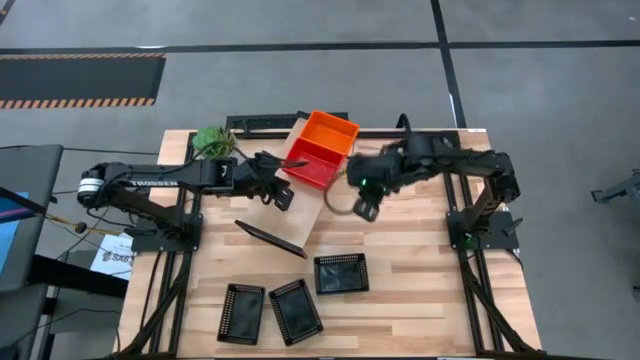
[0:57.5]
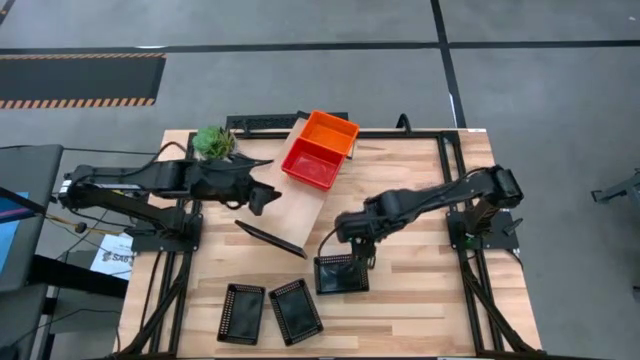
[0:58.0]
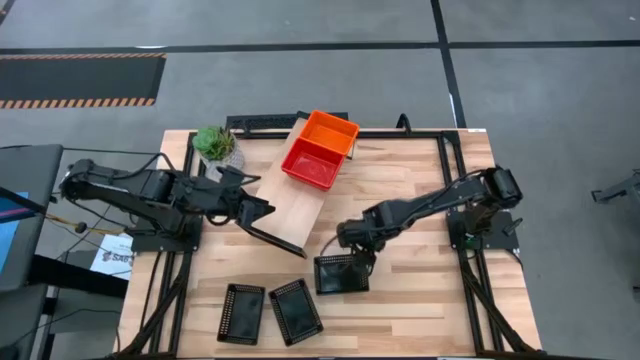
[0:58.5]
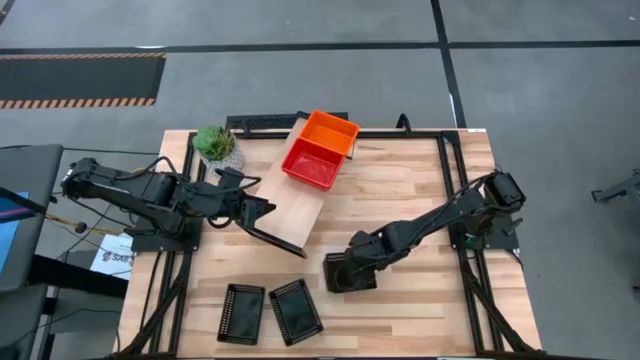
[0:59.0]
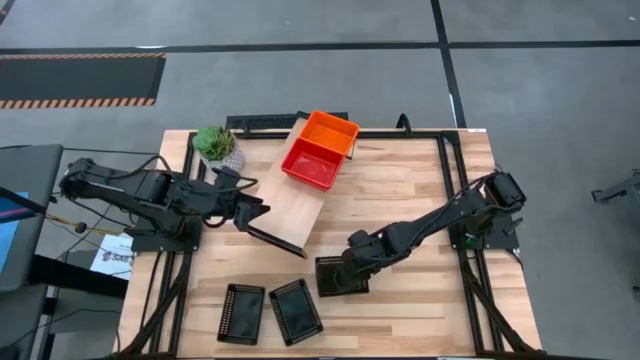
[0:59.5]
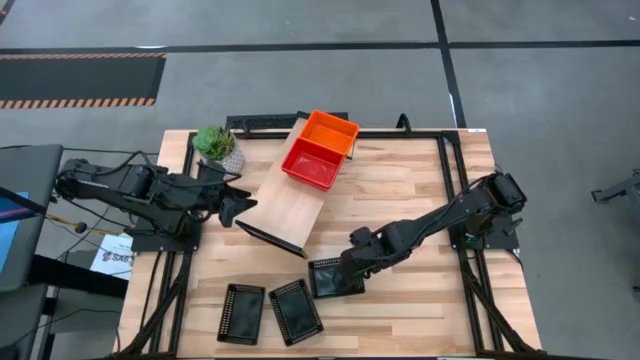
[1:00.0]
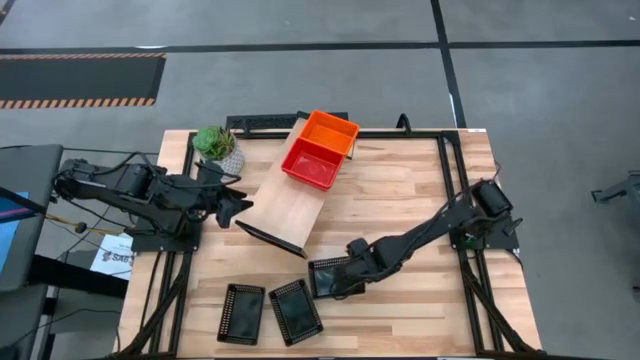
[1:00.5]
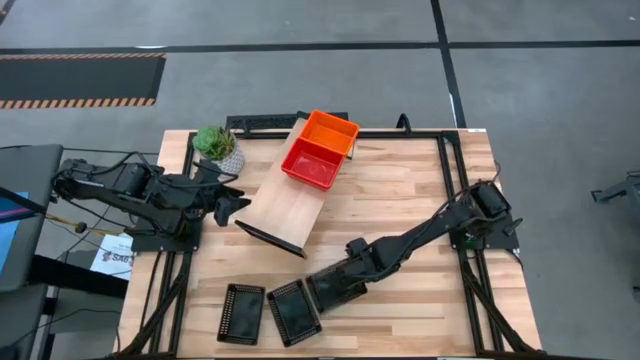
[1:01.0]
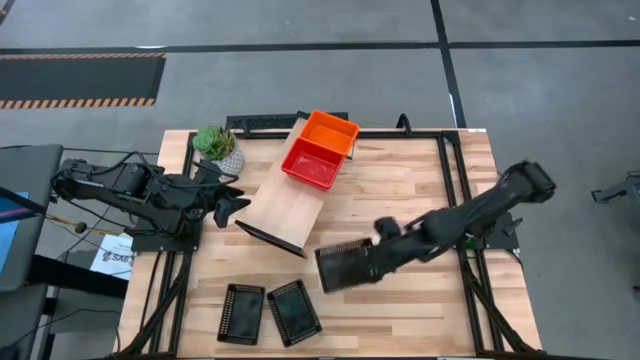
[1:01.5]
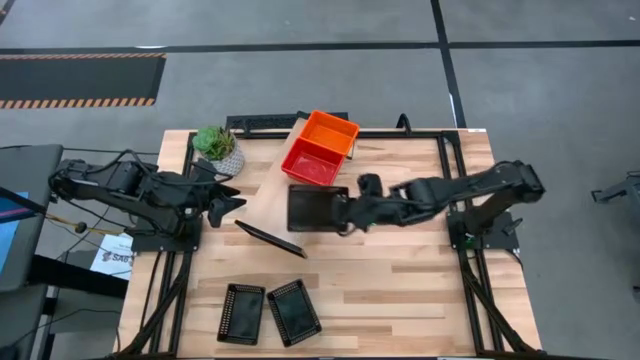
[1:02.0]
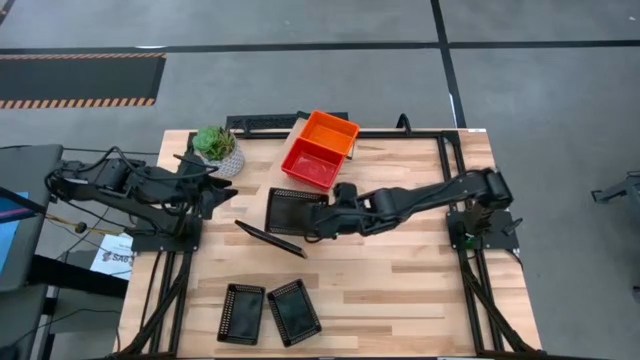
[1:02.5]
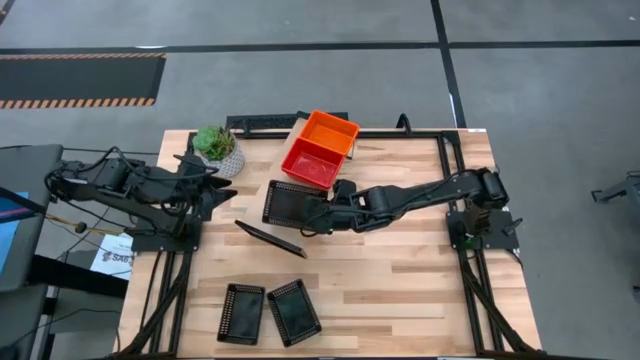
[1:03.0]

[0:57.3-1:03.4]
Task: Stack baskets on shelf by color
Put the right black bin on the shelf

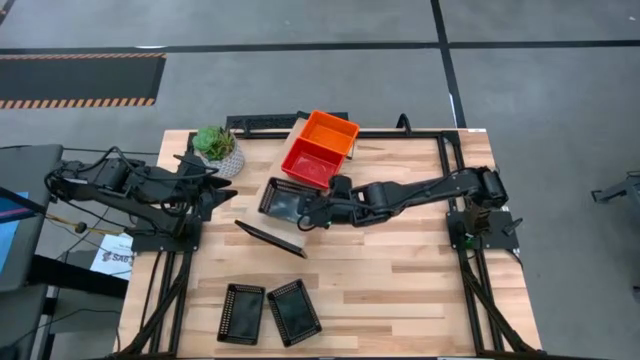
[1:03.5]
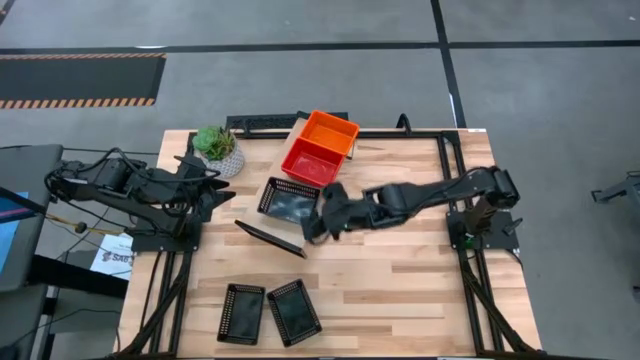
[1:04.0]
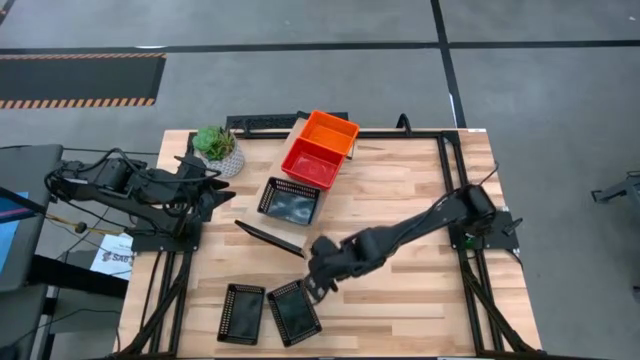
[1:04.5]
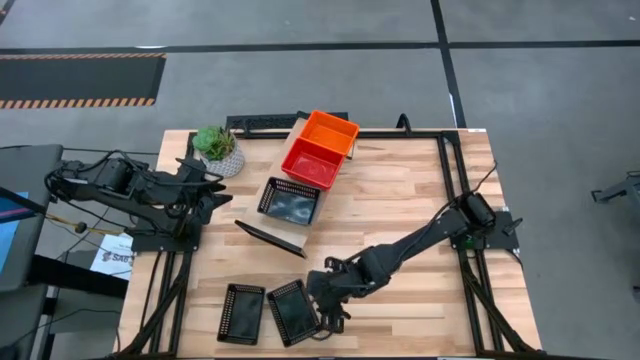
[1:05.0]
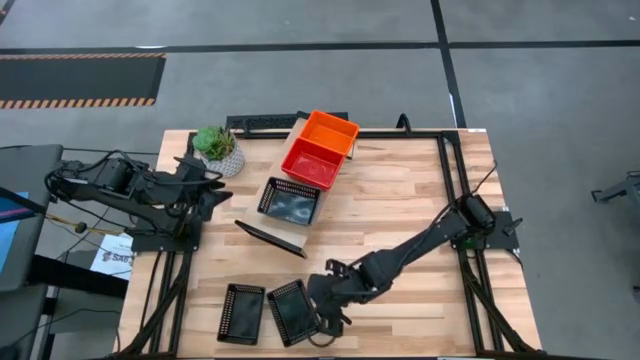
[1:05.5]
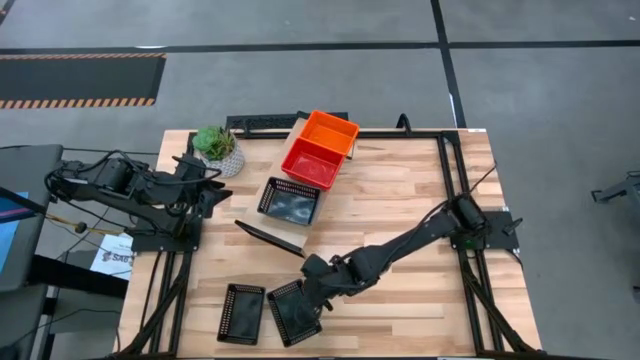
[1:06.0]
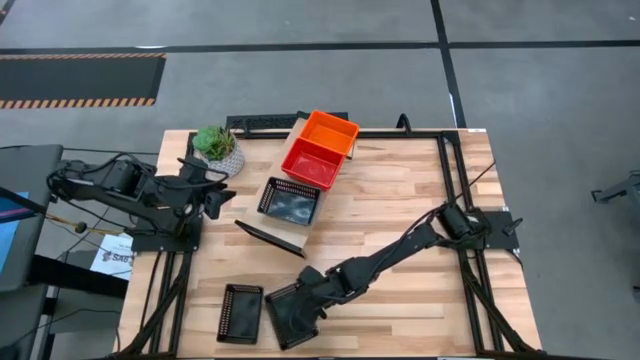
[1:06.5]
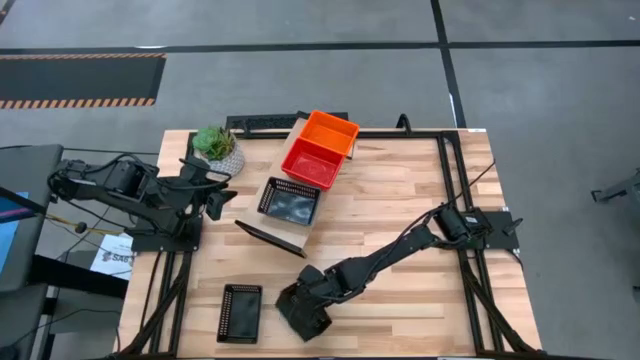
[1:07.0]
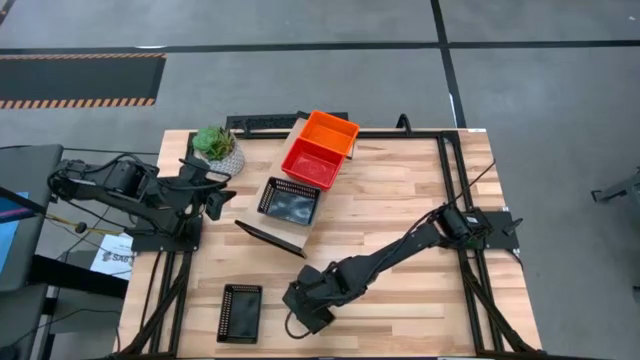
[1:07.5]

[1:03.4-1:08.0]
Stack the right black bin on top of the black bin on the shelf

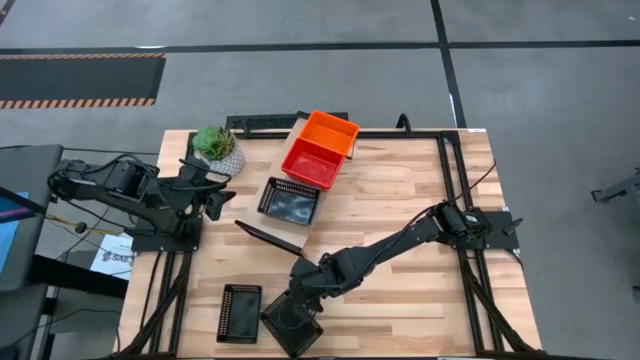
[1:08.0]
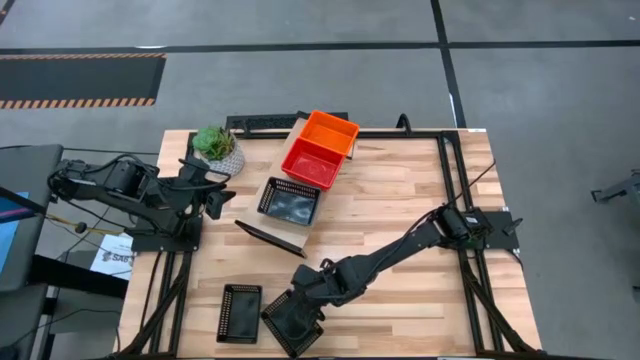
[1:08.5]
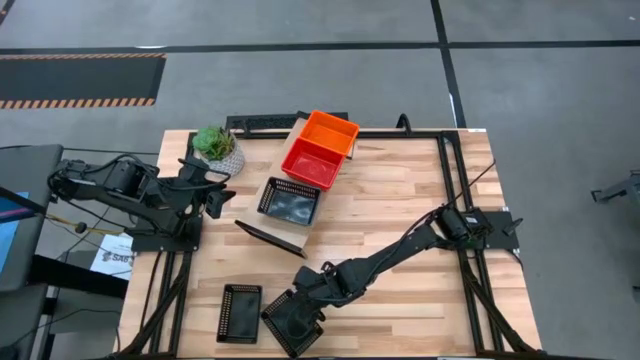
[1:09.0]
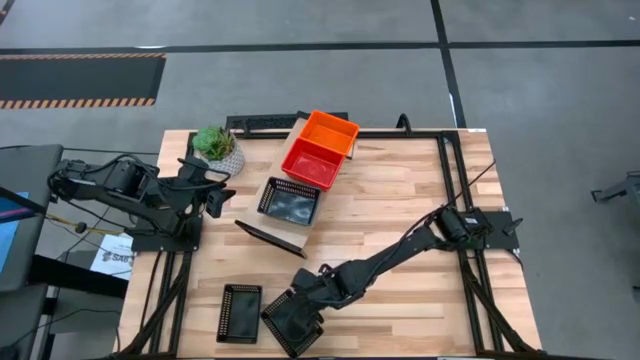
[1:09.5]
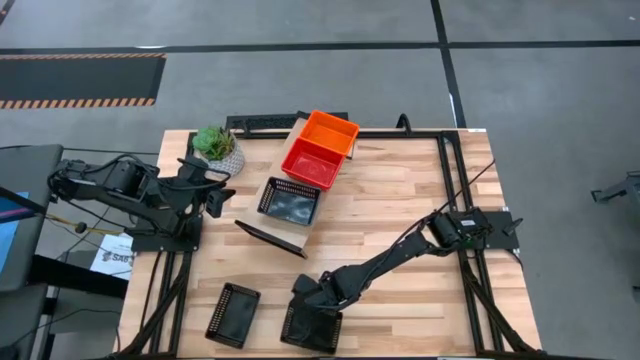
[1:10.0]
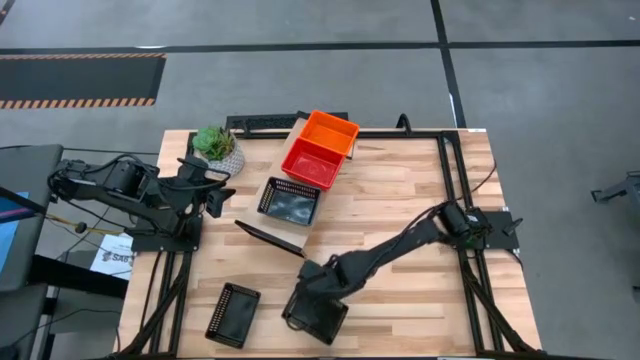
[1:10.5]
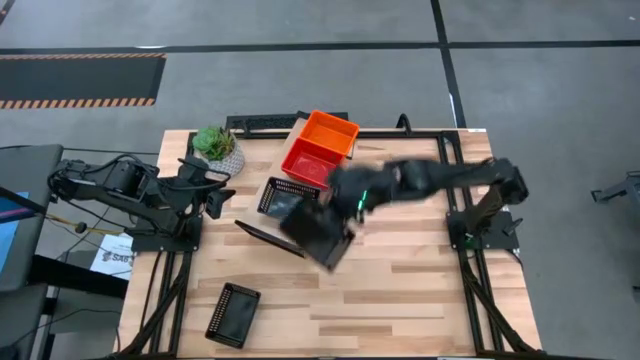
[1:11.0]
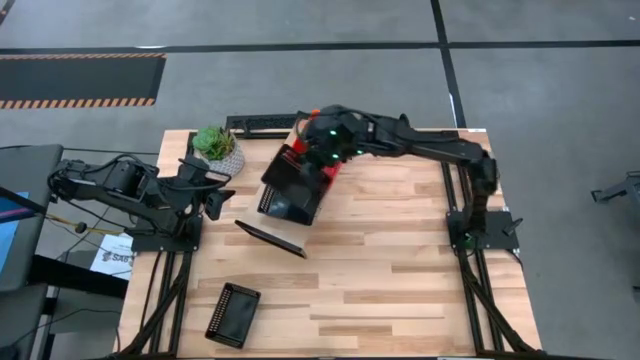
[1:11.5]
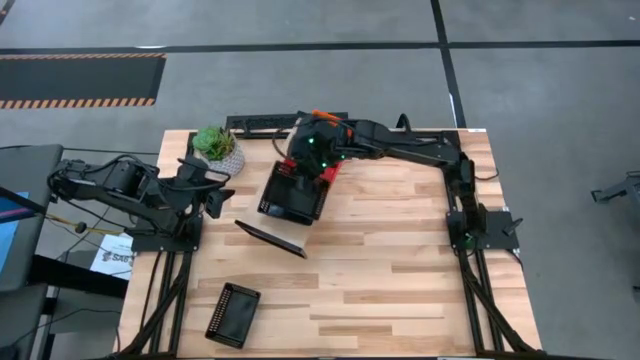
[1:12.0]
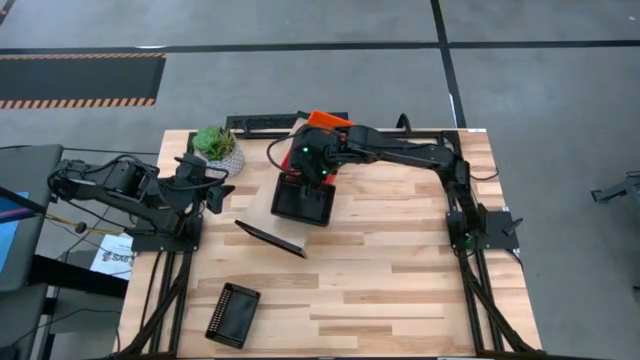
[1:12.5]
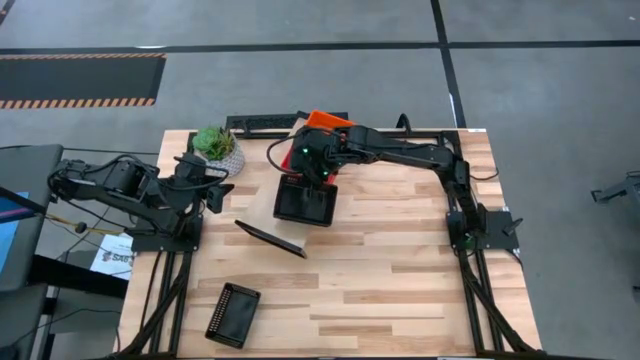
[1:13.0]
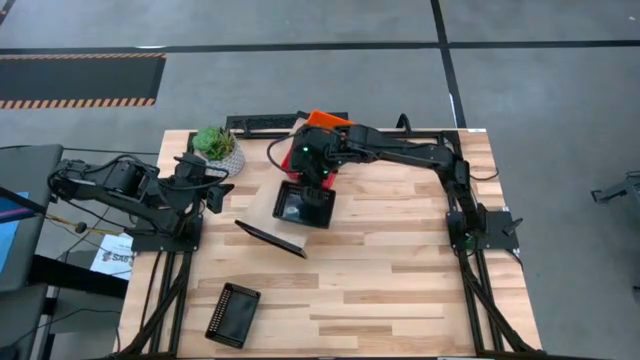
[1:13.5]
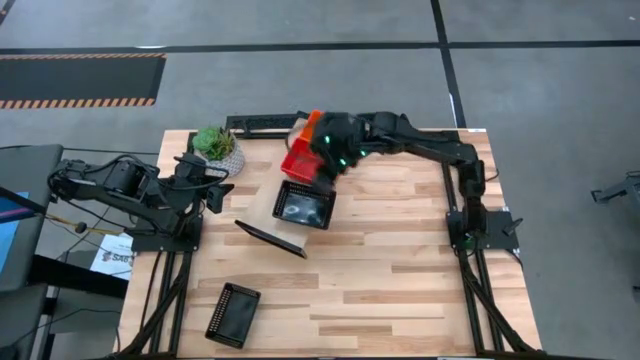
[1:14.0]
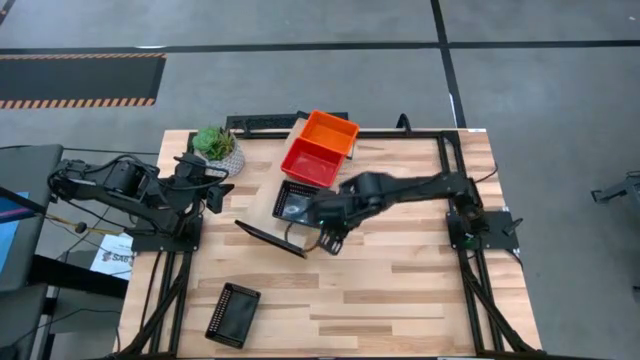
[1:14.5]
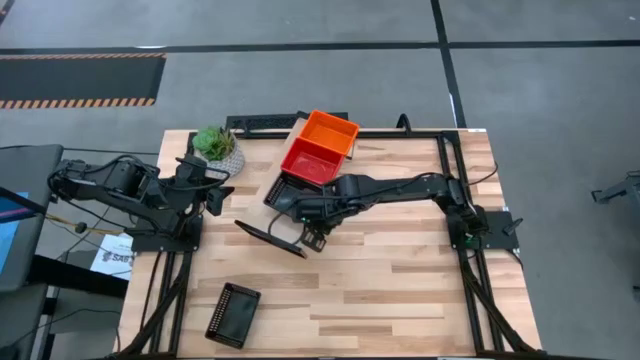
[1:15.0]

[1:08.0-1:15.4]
Stack the right black bin on top of the black bin on the shelf

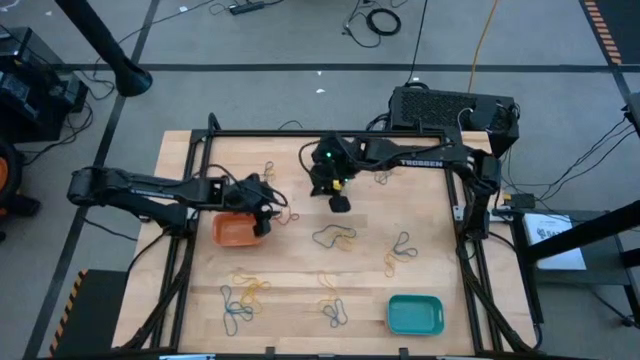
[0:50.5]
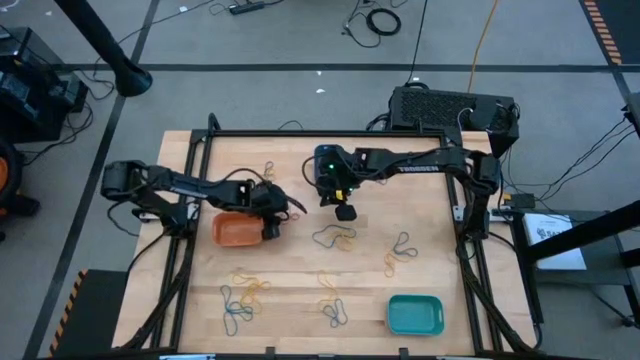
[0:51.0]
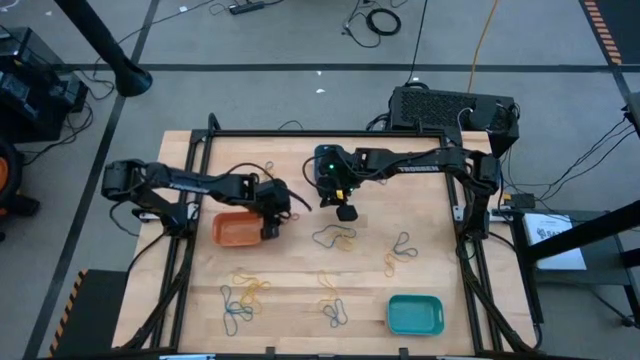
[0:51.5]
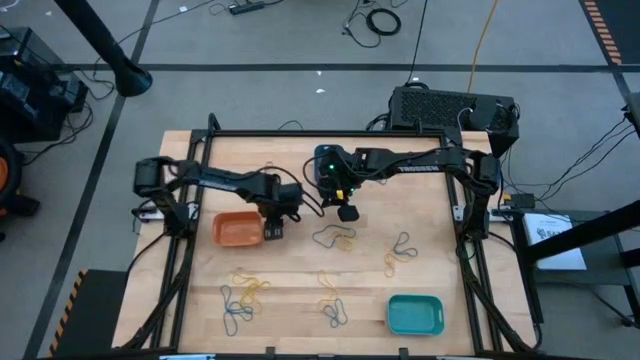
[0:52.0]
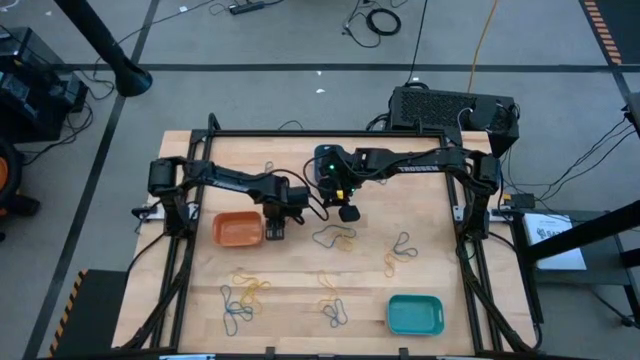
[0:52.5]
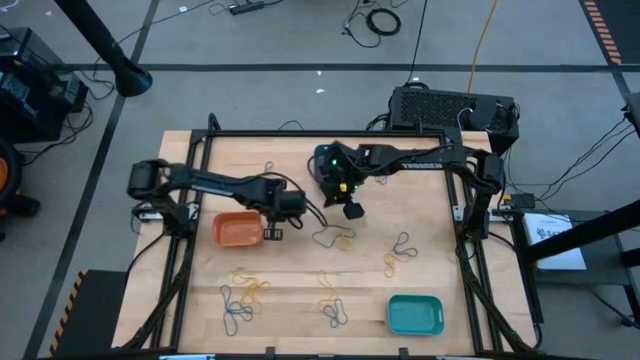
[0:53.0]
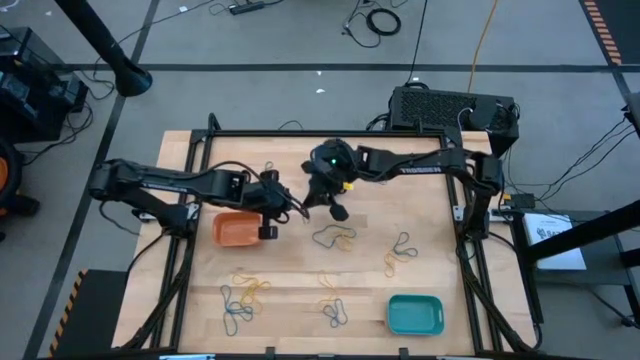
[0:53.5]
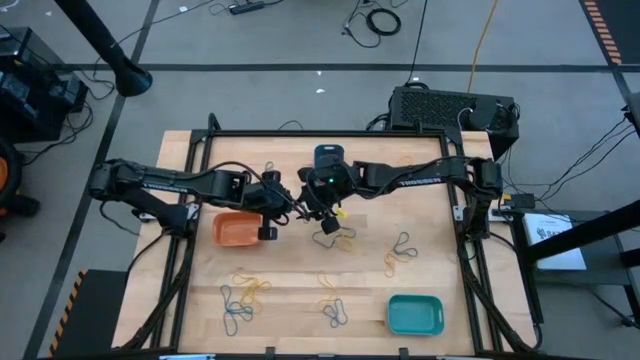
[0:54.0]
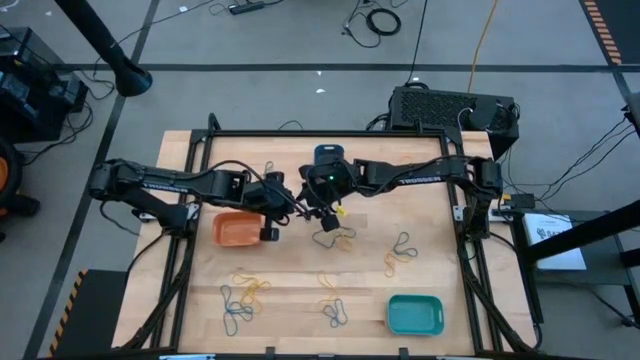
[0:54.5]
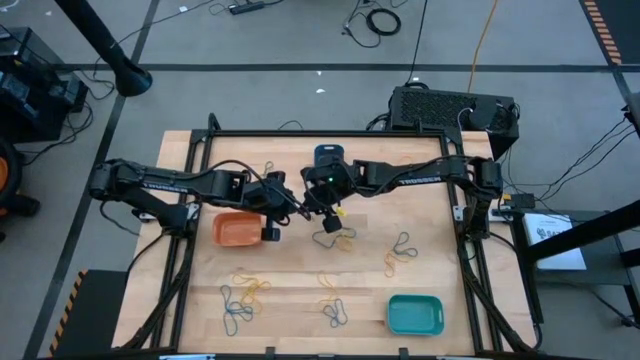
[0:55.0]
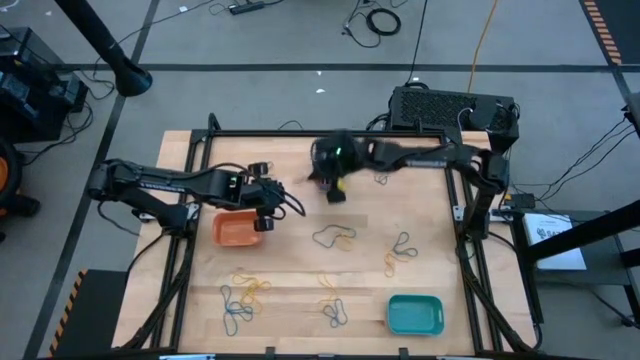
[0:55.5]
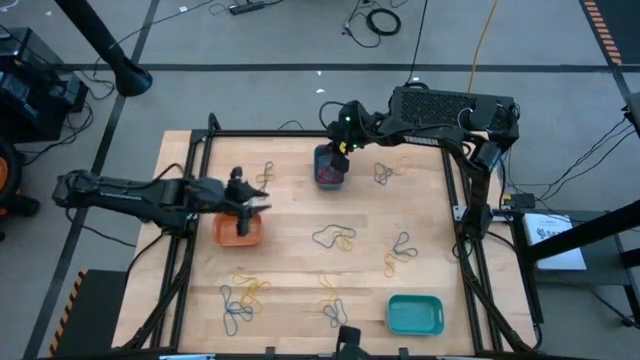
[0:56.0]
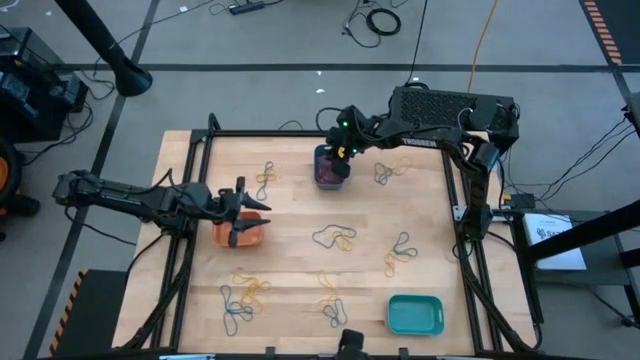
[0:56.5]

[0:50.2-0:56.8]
Task: Sort rubber bands into baskets
Put the red rubber band into the blue bin
